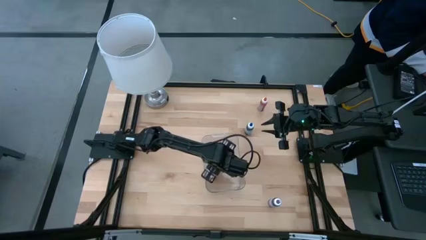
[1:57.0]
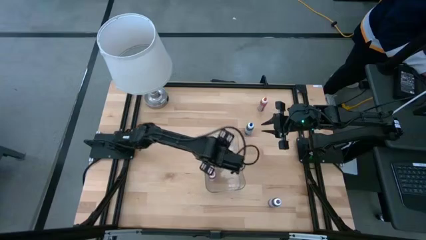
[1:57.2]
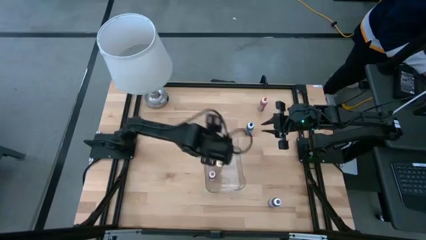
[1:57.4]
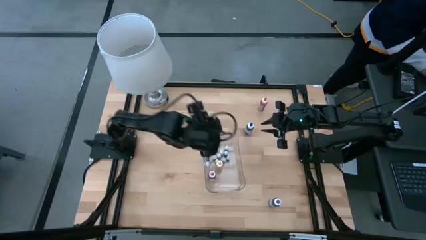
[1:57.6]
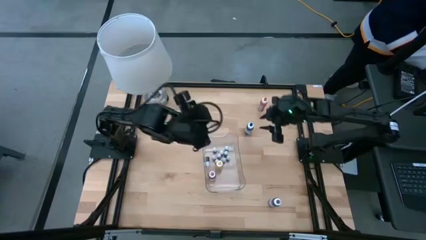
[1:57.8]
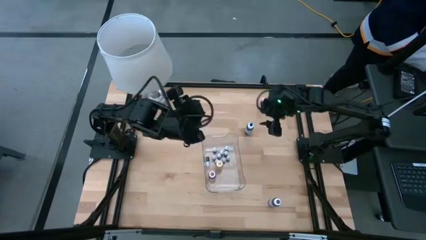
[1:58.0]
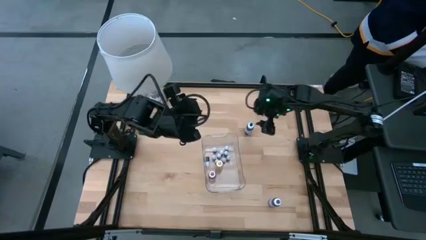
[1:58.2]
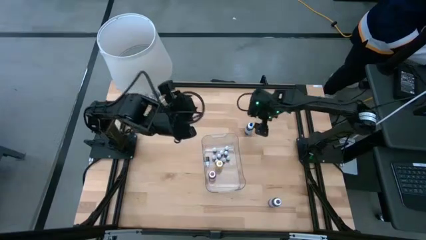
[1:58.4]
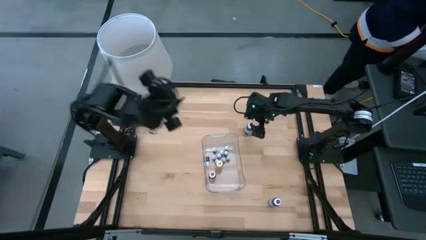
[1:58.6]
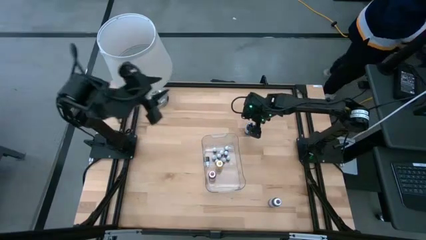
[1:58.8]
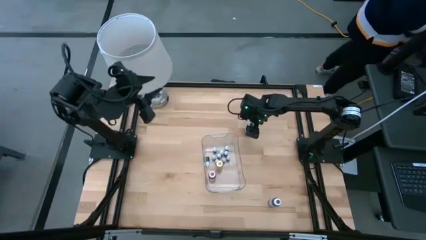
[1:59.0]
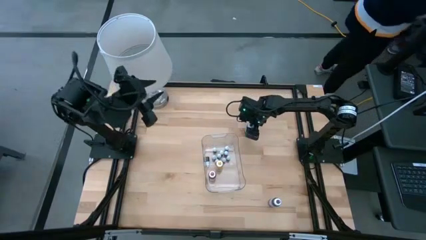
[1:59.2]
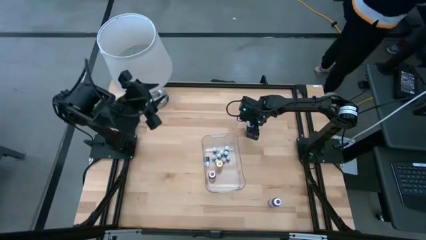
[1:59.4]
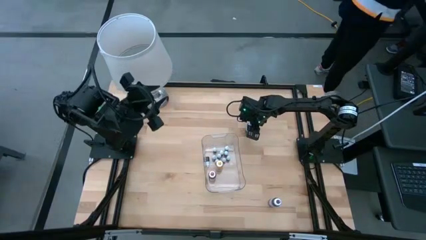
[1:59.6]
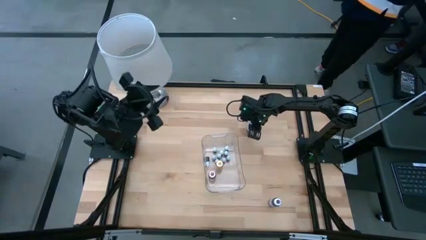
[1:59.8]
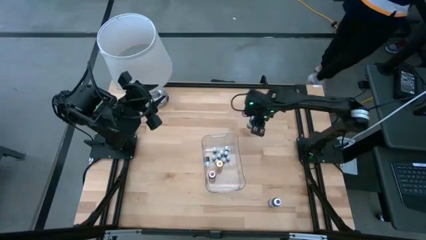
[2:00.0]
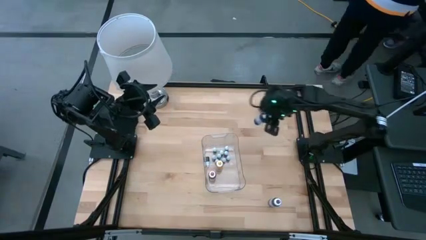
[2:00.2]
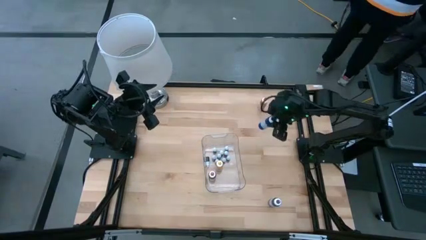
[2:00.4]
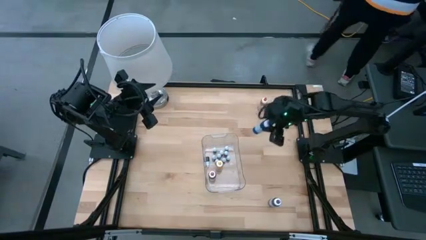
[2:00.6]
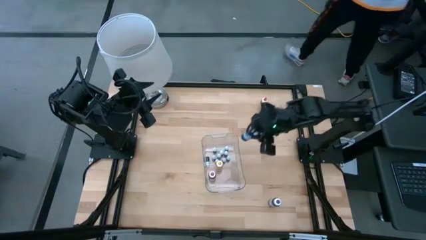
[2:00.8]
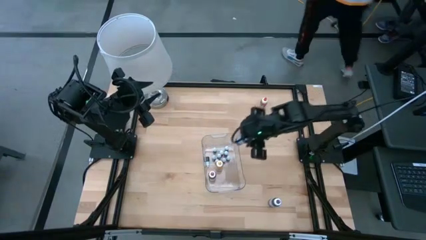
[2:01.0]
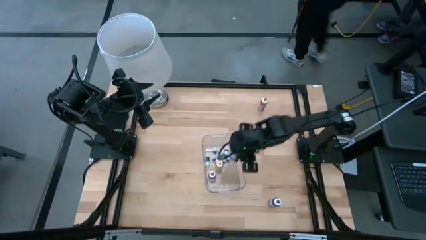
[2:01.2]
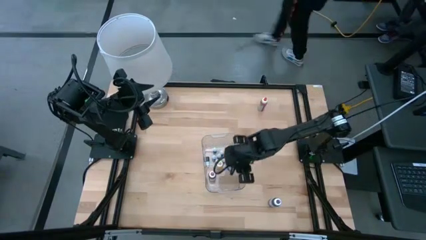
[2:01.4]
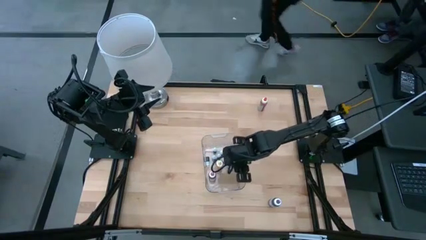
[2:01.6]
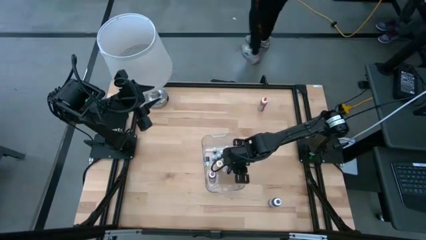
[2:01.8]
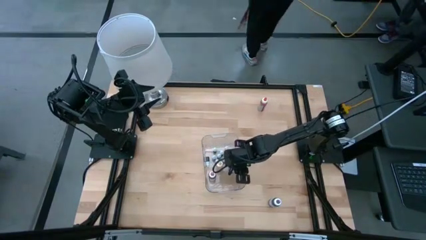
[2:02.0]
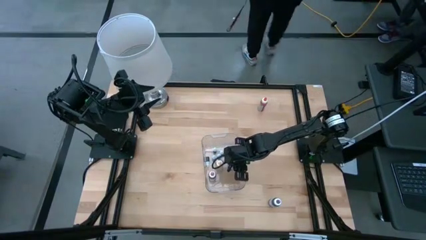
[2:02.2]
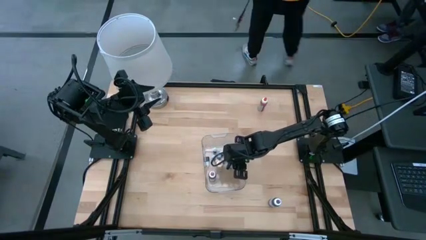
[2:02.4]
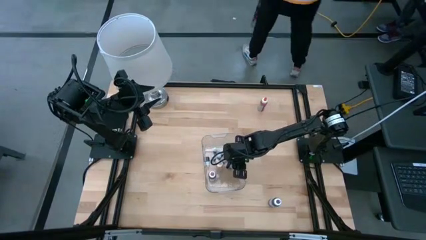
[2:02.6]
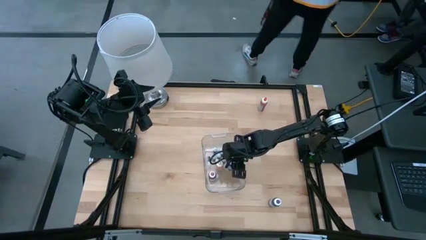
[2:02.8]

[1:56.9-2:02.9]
Task: Pick & Place food coloring
Put the large blue food coloring bottle into the transparent container

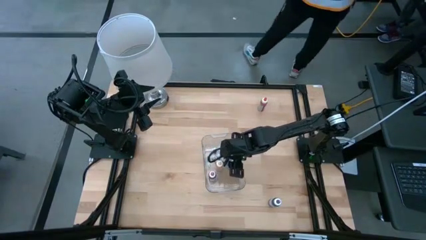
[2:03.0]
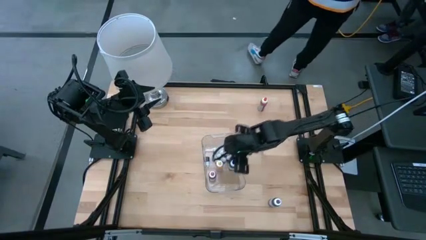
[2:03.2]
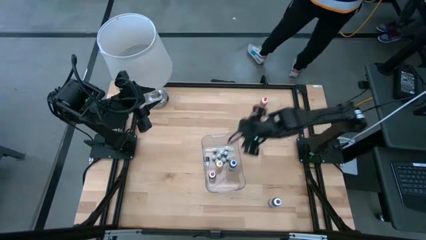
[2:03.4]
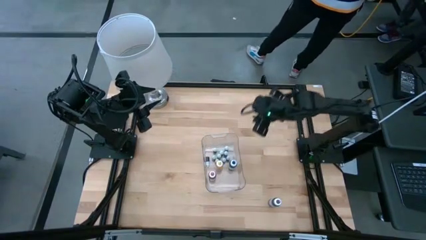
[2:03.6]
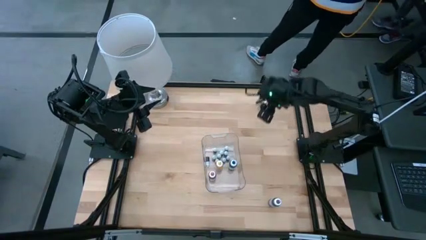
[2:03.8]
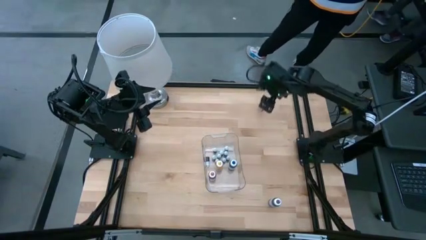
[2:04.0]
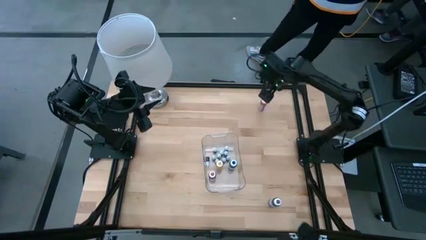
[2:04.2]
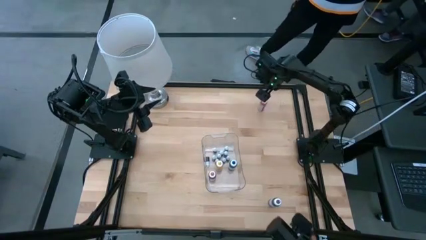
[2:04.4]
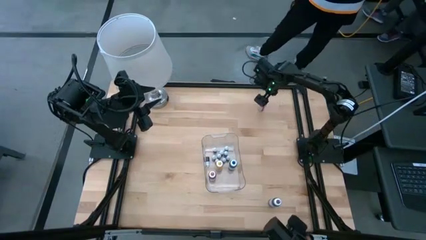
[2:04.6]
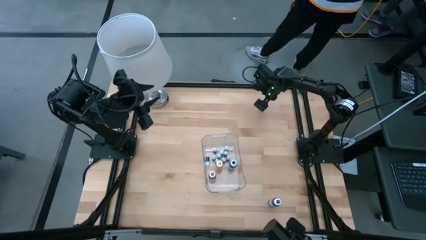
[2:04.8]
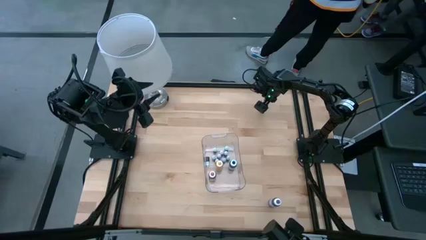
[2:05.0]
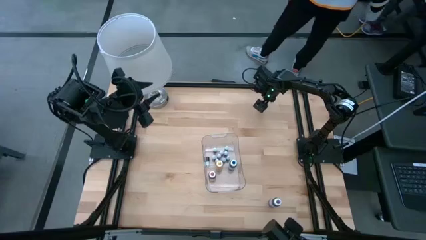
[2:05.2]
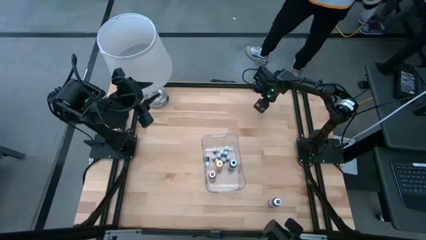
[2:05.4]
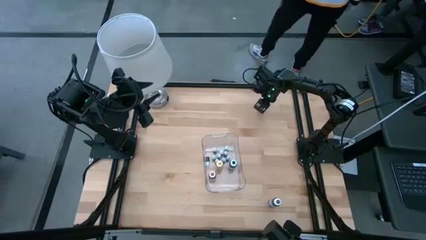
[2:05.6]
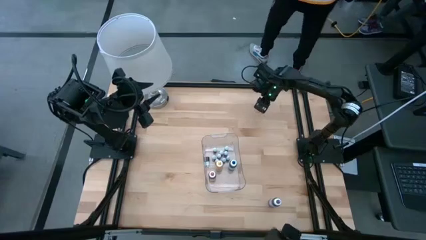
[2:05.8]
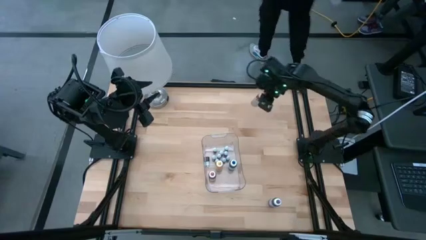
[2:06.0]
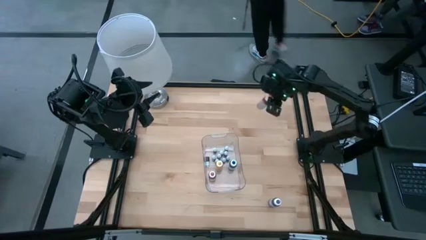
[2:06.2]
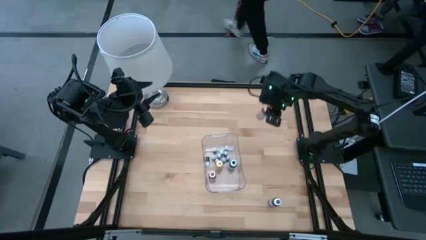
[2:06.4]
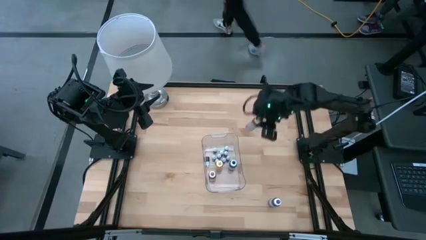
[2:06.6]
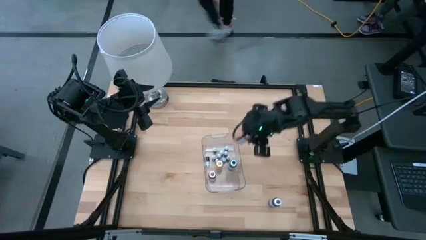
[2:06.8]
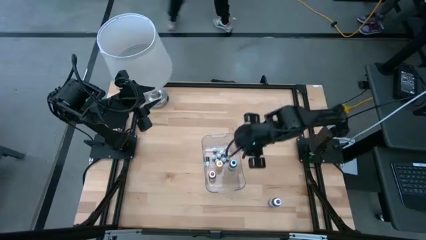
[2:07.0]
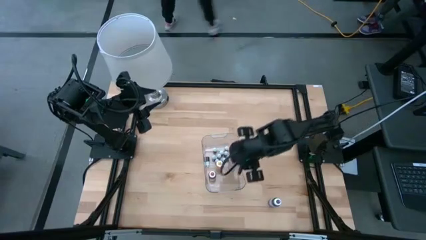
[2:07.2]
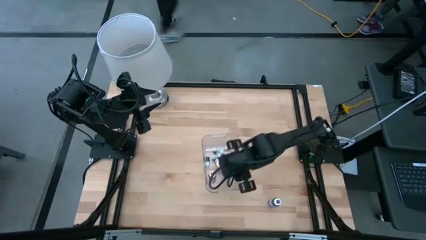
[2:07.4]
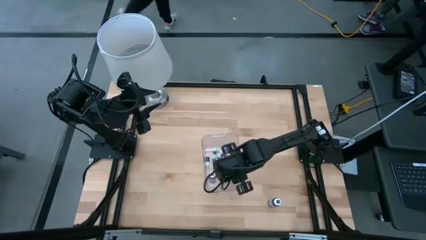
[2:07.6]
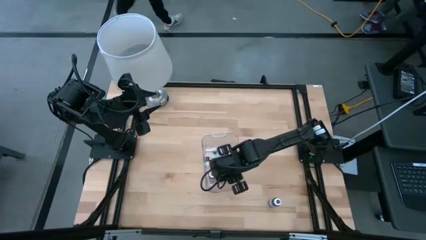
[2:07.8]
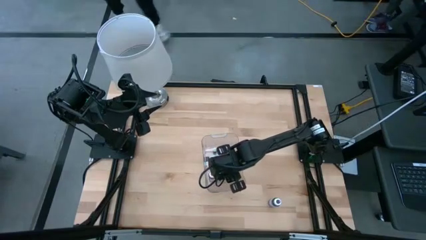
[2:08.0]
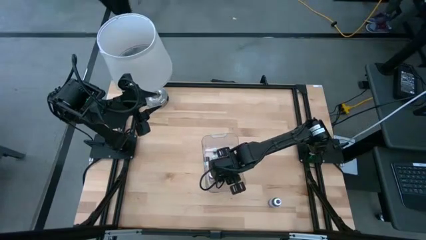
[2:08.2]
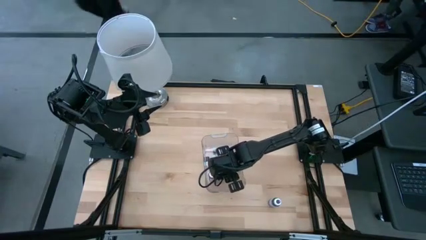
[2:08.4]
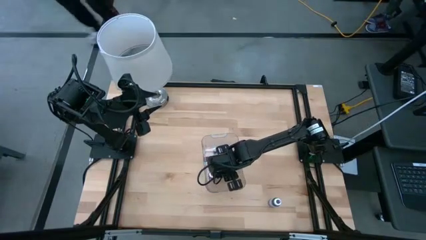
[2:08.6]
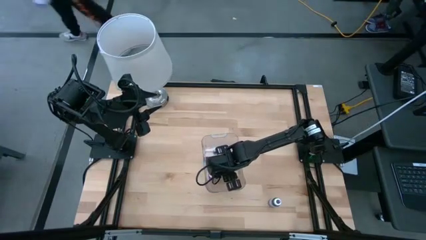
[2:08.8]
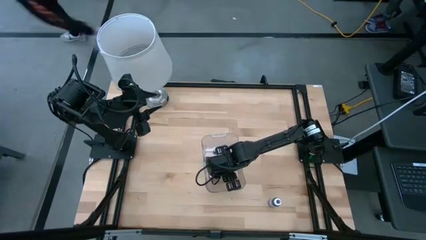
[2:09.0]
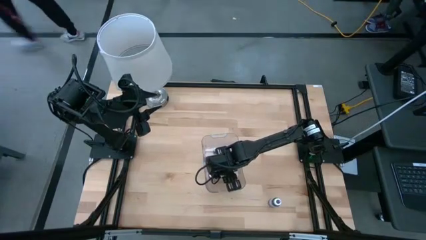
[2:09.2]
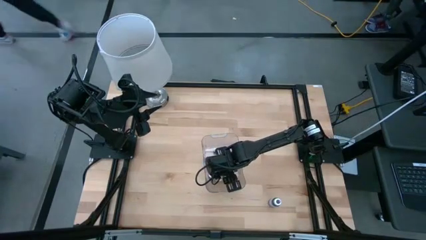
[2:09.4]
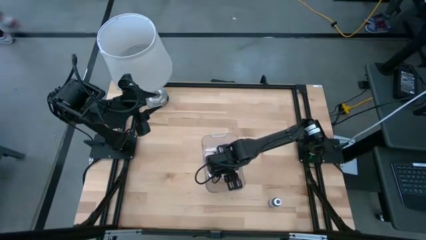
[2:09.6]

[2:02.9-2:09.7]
Put the large orange food coloring bottle into the transparent container

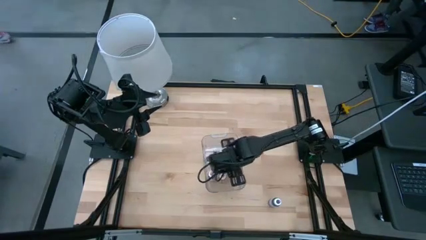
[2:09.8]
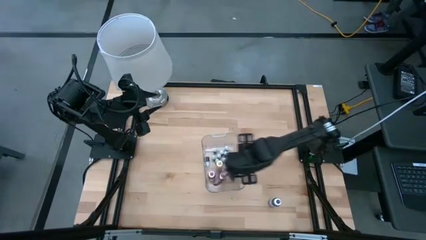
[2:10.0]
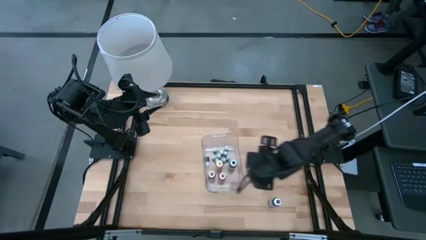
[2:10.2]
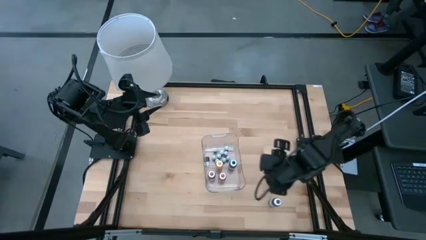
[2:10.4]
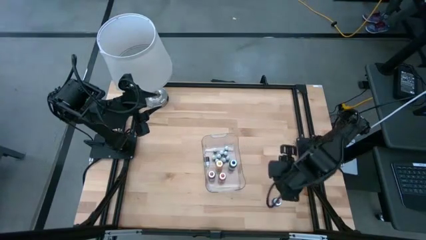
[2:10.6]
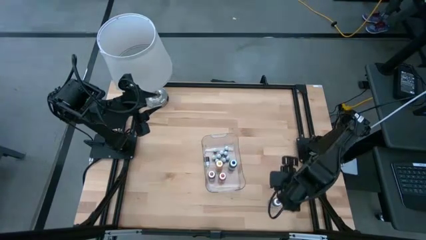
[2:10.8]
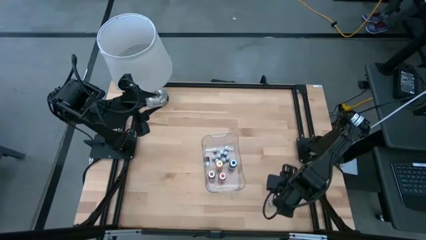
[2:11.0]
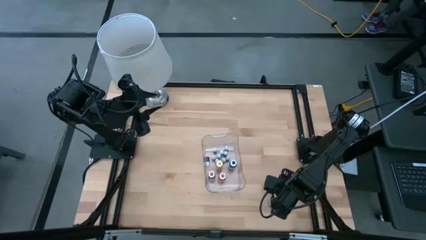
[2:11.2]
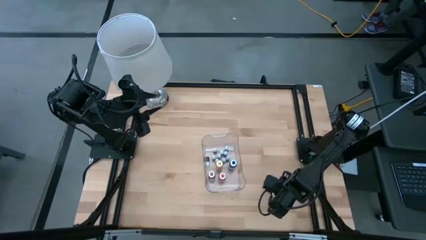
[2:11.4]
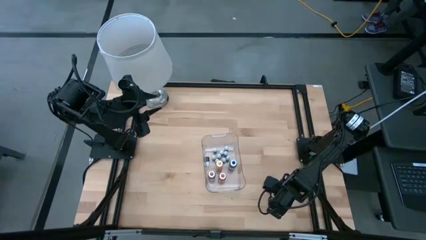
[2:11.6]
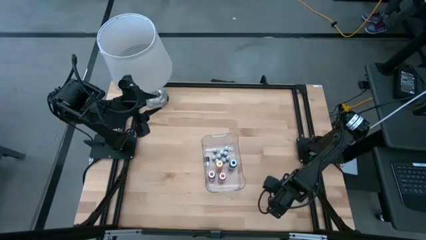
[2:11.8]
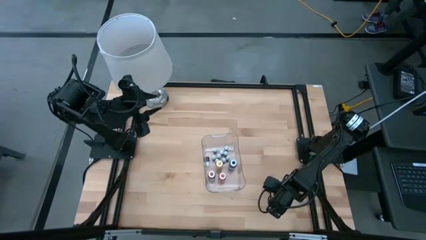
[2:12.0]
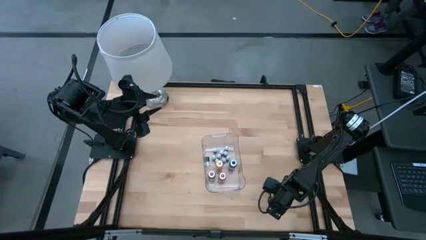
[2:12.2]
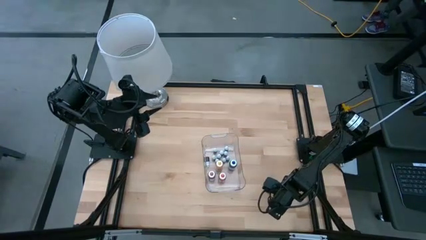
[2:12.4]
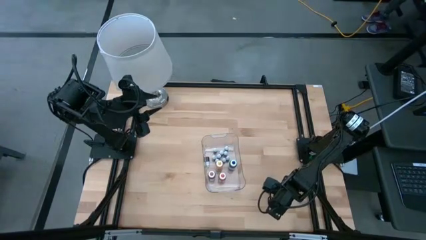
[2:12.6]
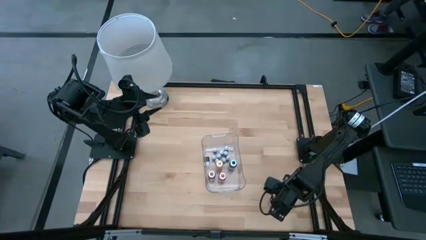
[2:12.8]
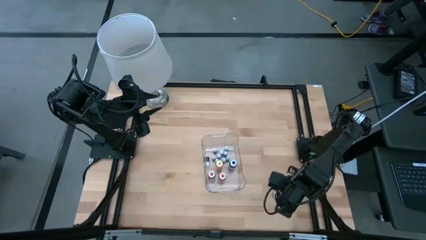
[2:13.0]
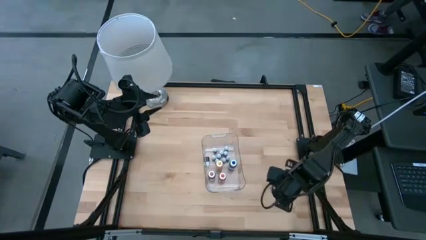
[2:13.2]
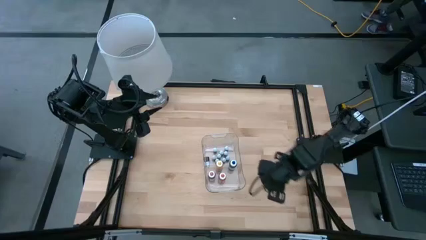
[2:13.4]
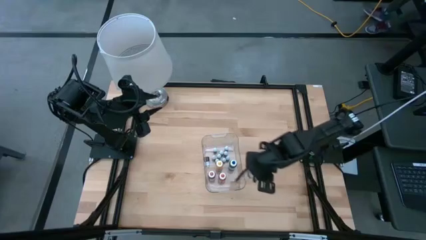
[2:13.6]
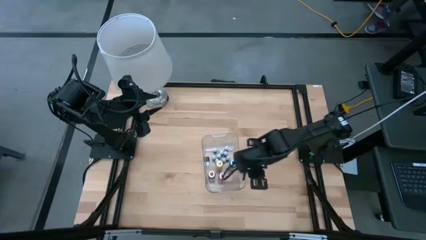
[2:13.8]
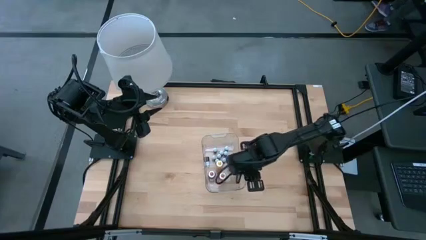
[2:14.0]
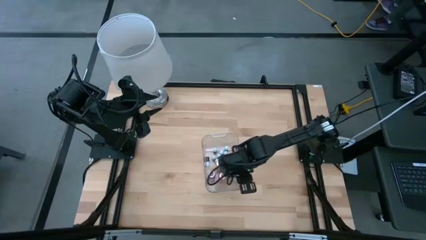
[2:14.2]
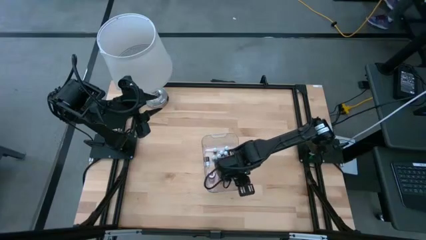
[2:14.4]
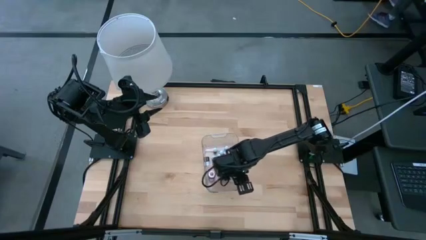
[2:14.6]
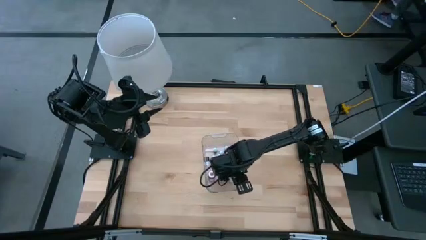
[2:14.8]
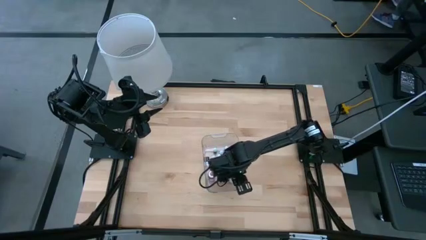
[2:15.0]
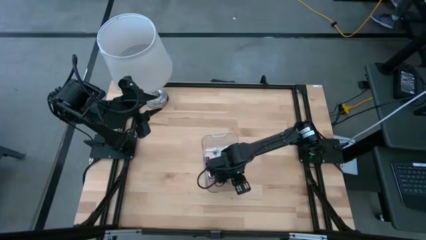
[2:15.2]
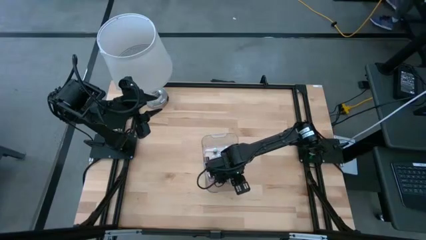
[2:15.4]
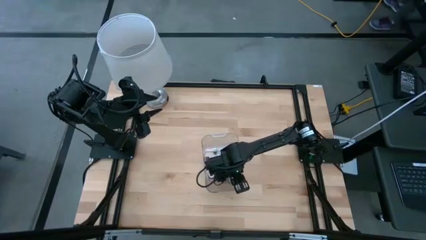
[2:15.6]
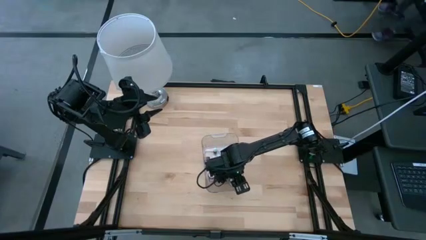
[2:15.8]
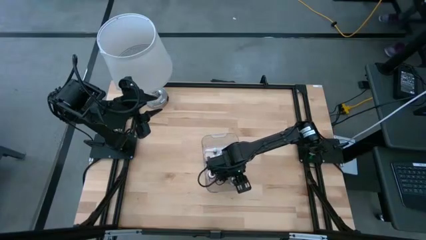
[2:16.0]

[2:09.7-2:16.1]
Put the large purple food coloring bottle into the transparent container
